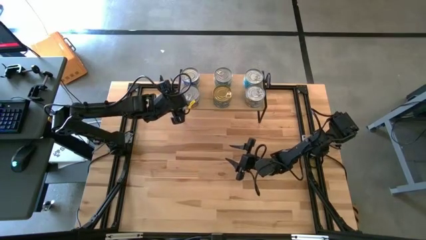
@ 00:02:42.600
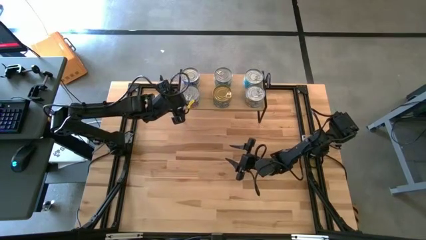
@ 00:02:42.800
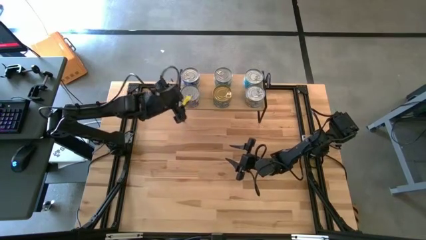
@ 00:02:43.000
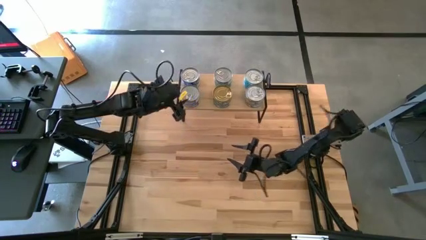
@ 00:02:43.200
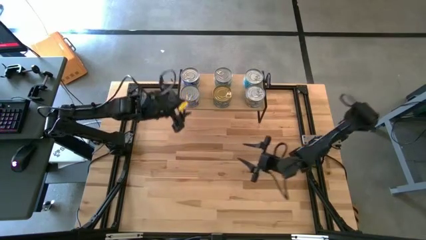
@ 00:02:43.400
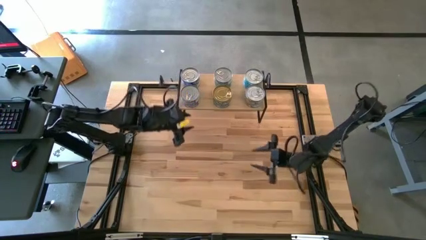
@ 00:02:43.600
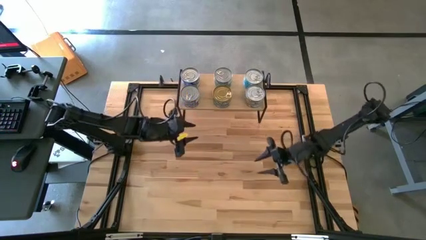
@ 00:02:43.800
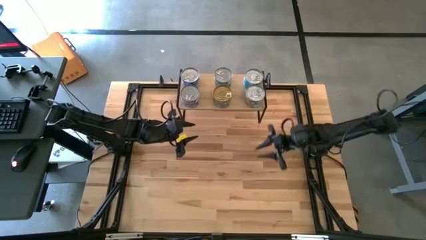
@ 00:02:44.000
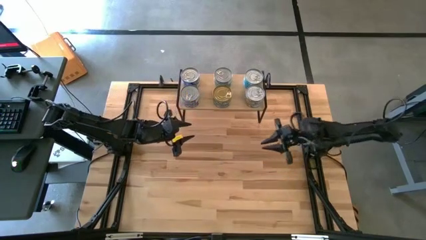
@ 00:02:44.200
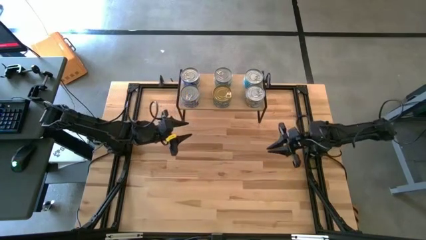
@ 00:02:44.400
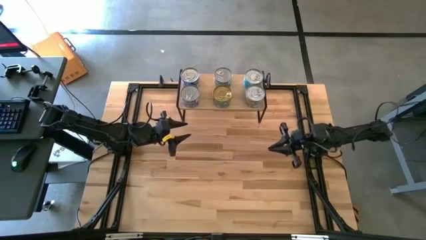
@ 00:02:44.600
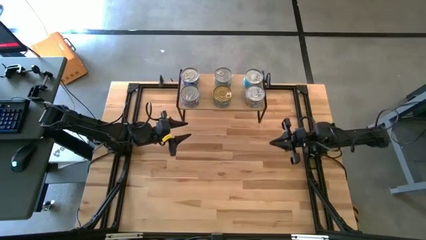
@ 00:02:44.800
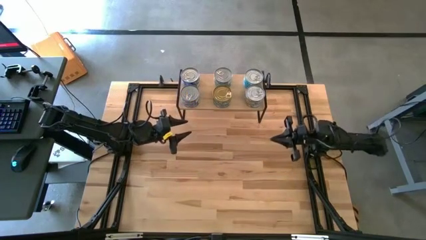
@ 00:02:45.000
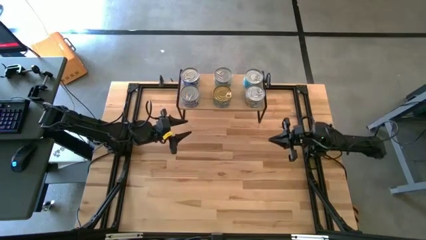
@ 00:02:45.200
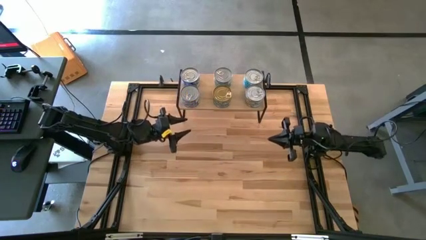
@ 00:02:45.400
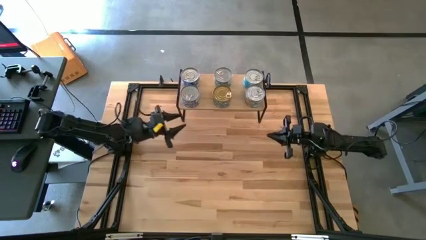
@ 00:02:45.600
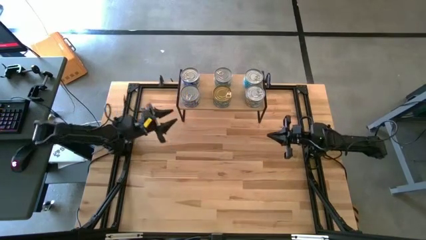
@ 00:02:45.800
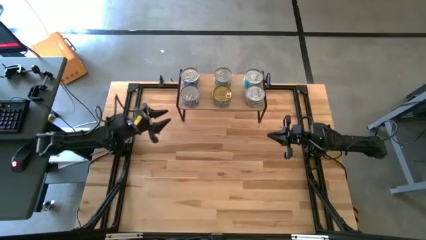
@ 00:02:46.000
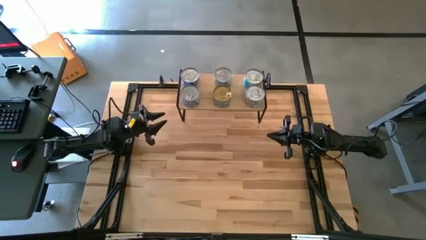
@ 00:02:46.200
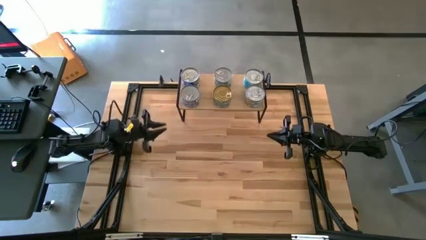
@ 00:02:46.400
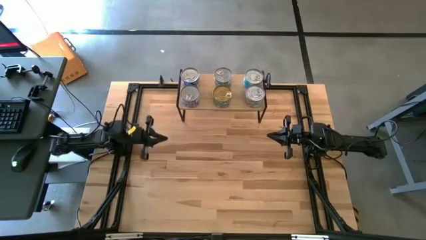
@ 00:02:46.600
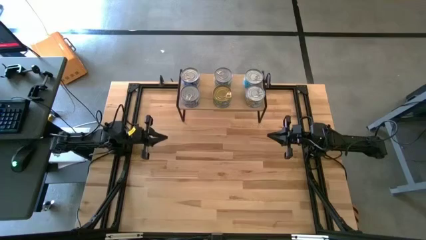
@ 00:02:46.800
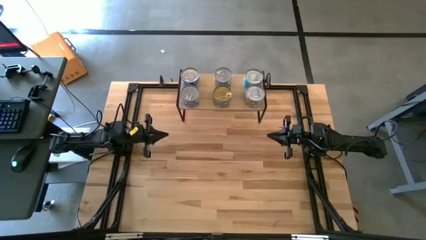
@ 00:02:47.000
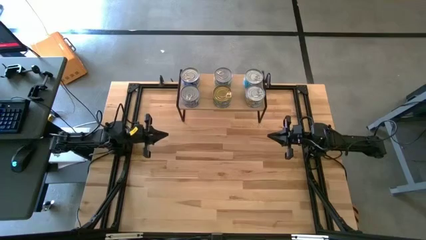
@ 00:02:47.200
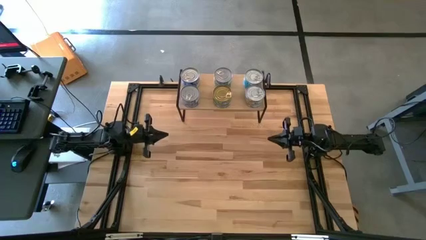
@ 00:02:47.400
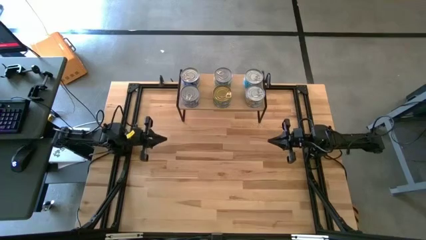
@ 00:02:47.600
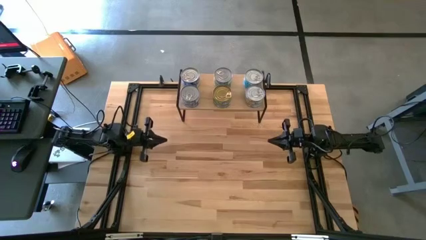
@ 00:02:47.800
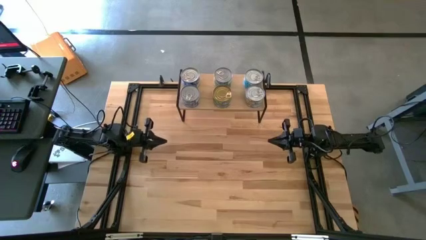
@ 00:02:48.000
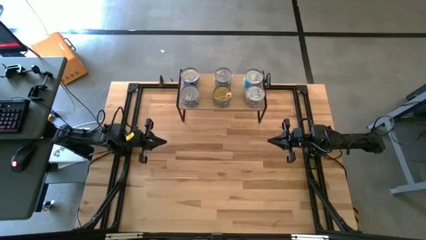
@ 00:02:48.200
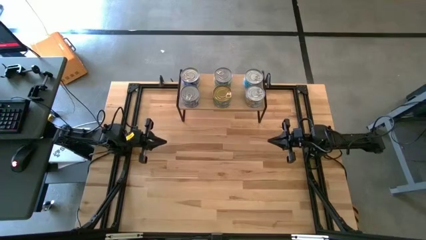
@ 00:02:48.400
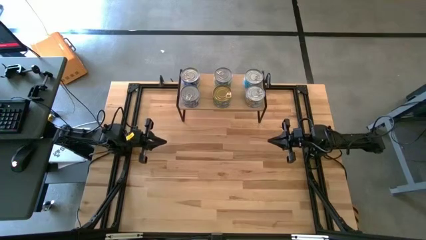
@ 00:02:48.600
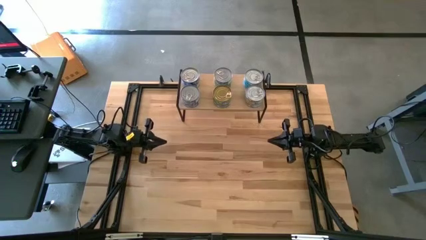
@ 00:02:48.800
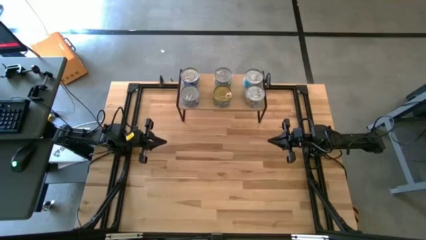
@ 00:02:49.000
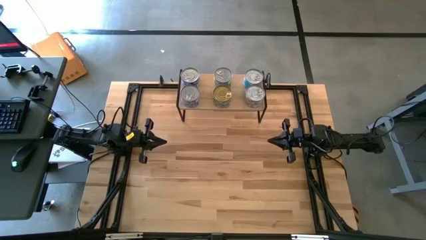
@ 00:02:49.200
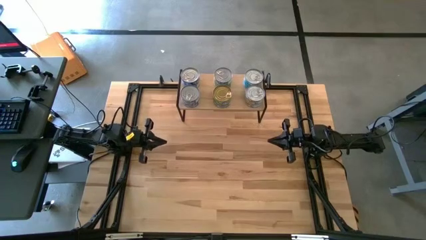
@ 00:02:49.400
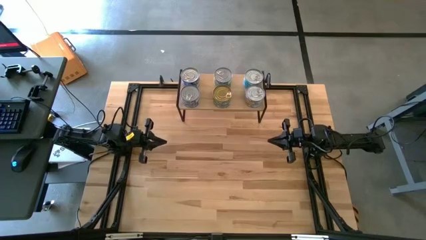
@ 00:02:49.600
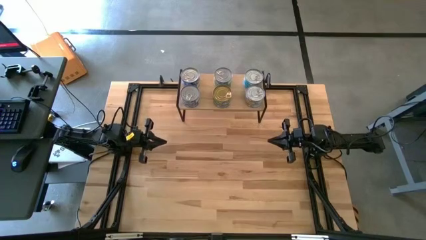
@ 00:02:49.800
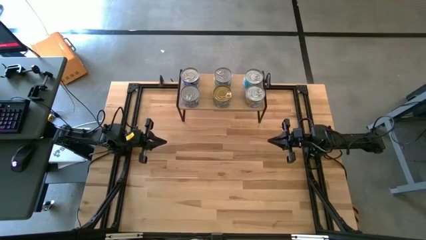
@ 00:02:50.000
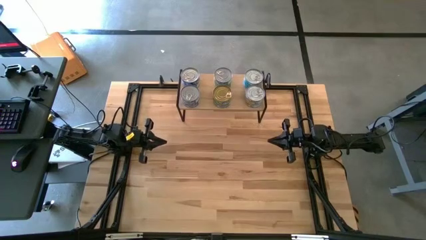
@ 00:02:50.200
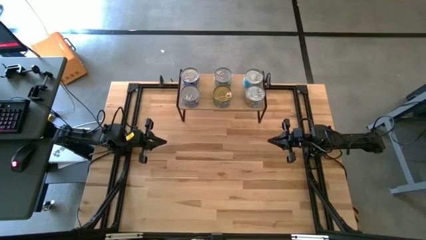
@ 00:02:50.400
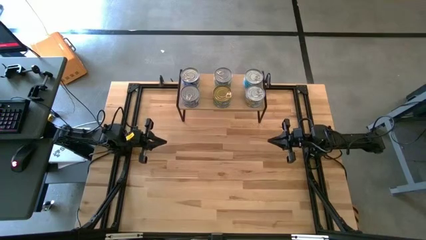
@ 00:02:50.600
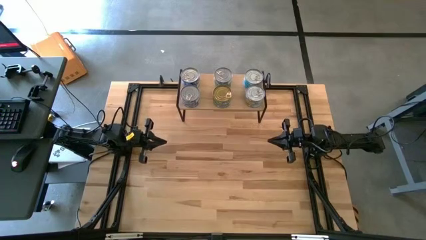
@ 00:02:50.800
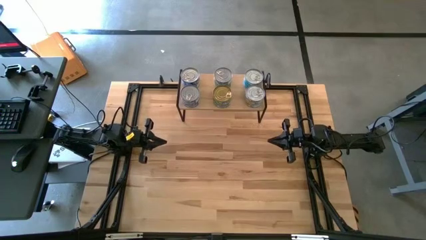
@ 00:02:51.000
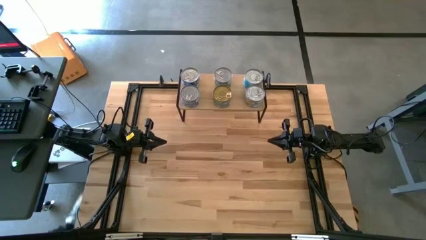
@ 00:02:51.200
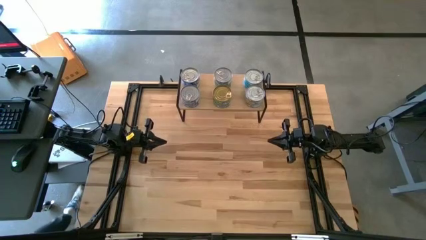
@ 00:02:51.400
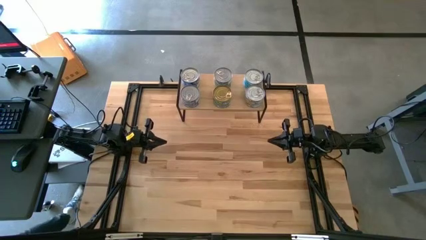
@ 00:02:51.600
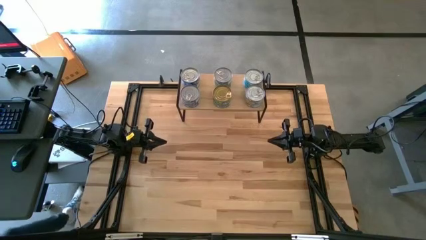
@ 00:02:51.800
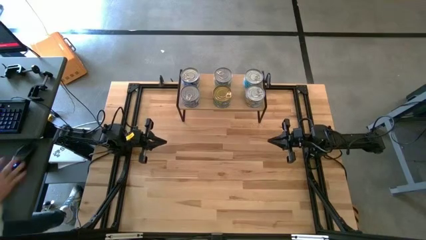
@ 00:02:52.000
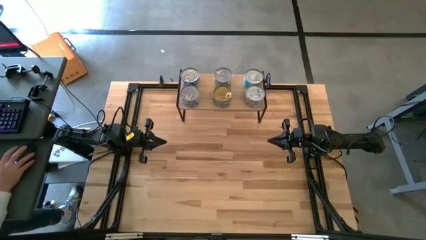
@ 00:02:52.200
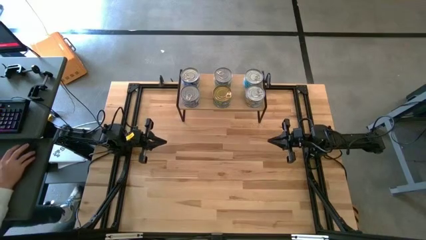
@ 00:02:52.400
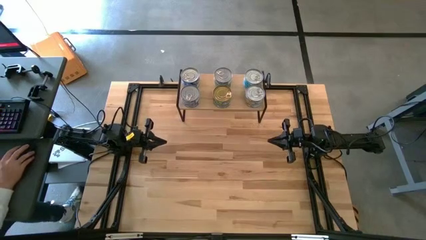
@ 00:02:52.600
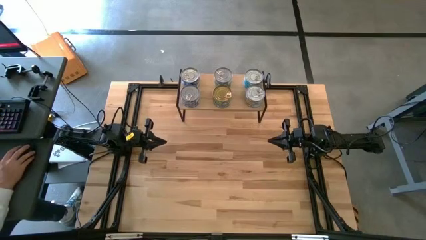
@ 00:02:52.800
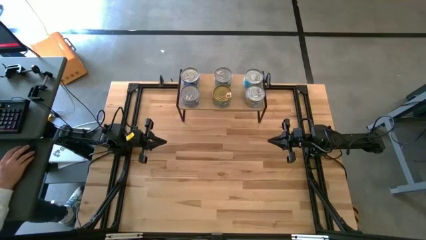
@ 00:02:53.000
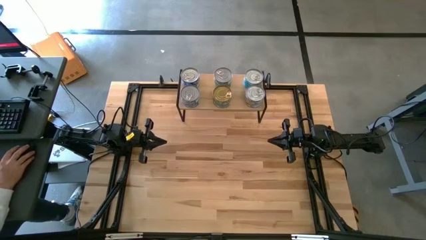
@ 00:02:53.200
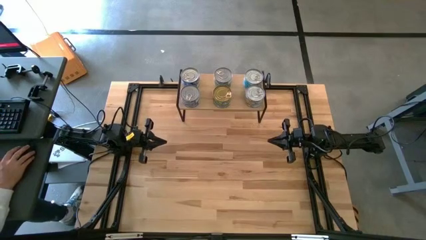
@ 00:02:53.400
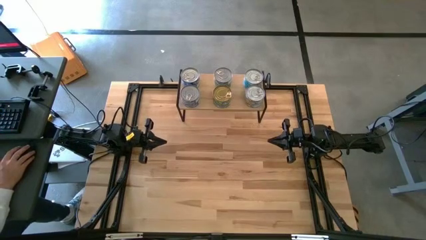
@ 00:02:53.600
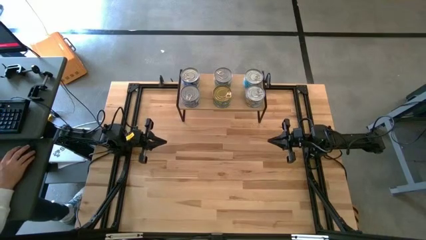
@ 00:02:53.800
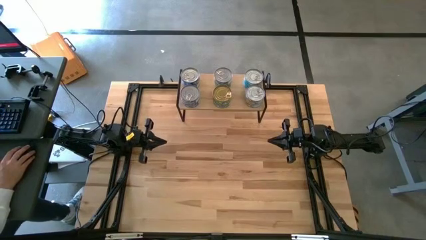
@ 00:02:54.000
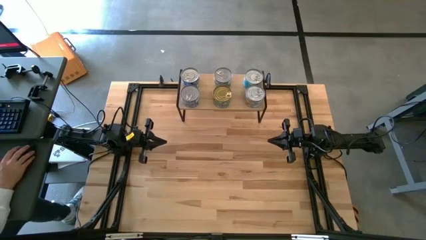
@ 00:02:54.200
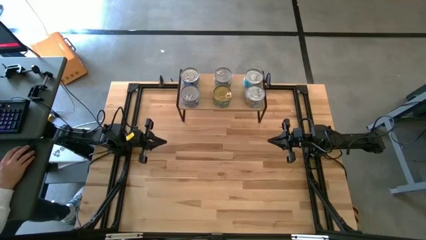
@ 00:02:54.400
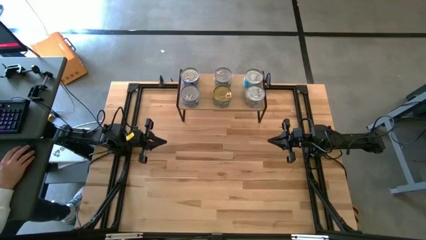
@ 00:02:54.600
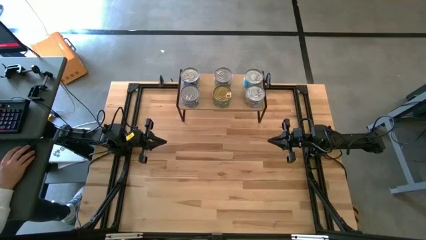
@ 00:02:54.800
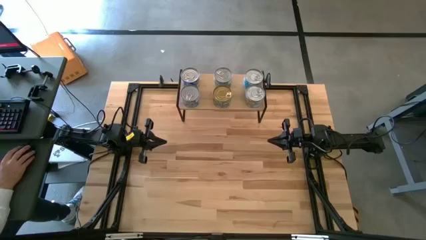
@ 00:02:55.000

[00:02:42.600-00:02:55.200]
Task: Stack canned seafood by type on shelf
Return to Home Position
